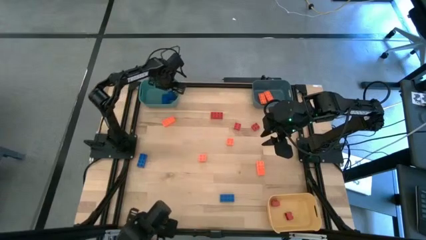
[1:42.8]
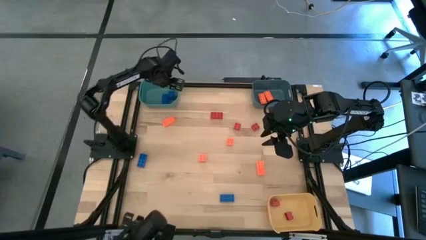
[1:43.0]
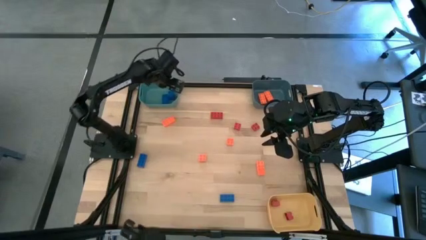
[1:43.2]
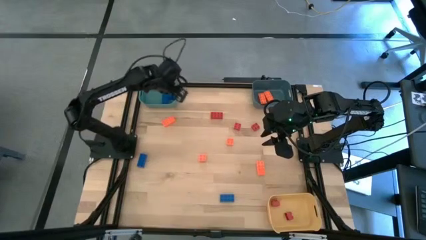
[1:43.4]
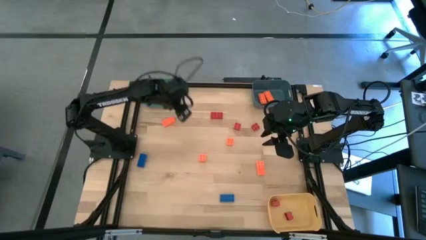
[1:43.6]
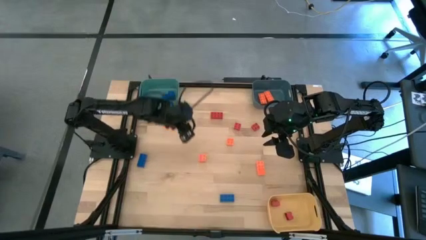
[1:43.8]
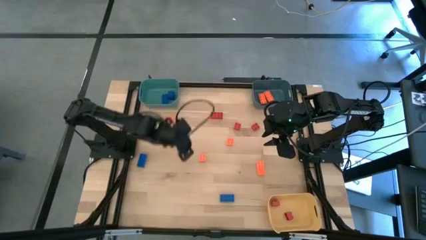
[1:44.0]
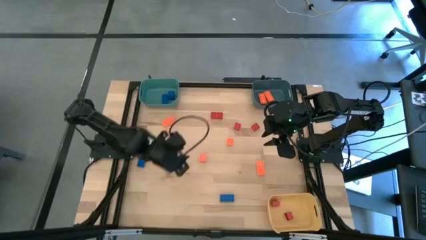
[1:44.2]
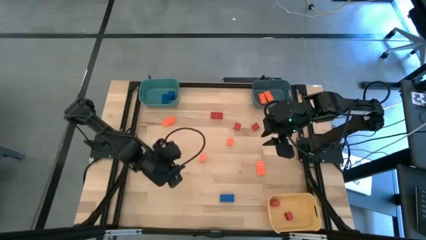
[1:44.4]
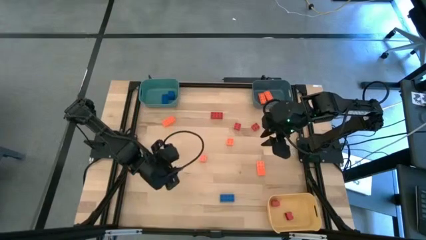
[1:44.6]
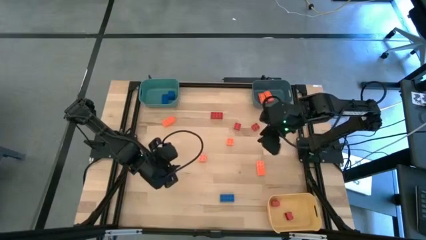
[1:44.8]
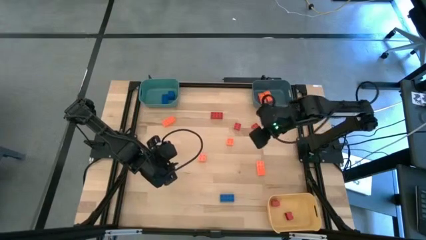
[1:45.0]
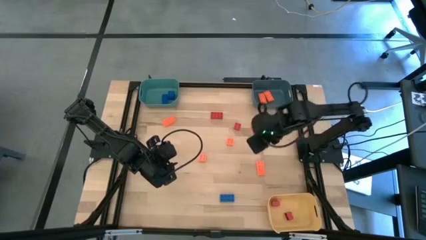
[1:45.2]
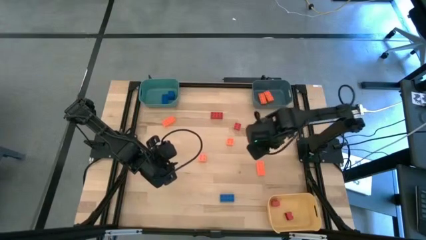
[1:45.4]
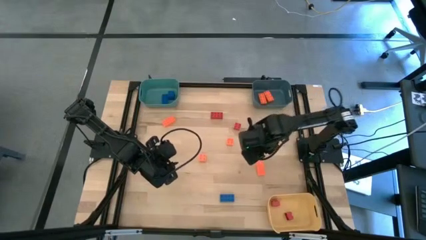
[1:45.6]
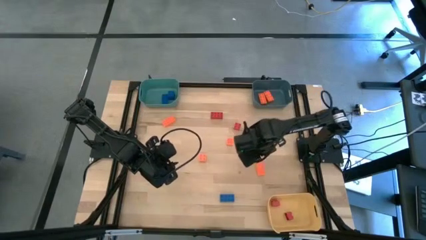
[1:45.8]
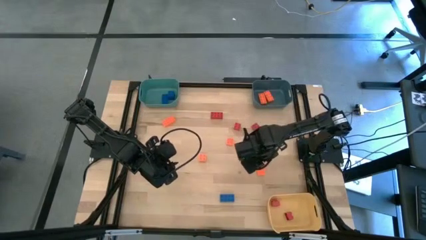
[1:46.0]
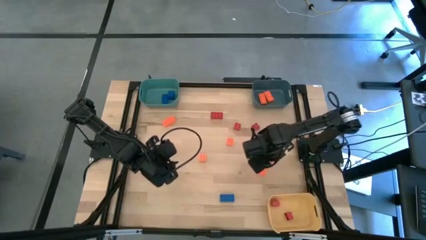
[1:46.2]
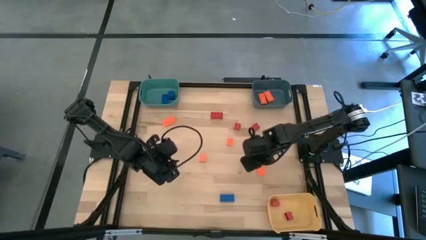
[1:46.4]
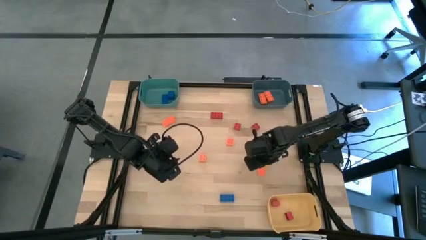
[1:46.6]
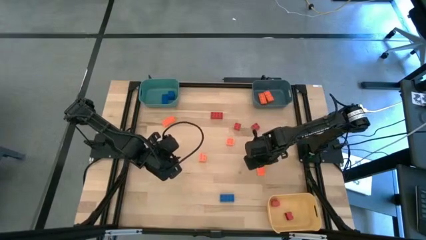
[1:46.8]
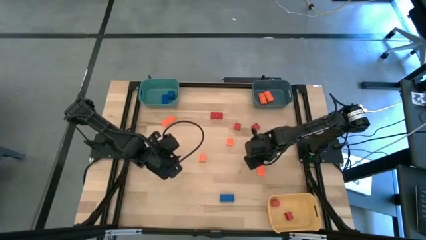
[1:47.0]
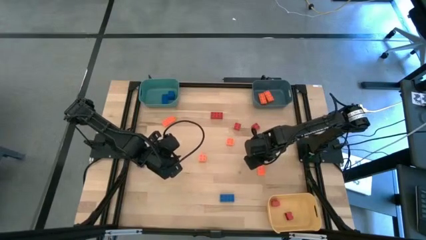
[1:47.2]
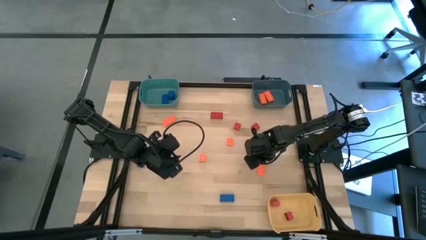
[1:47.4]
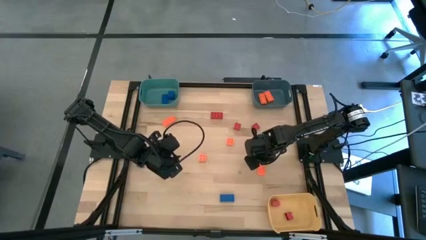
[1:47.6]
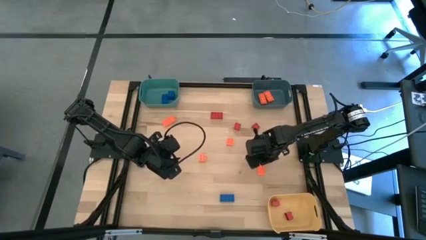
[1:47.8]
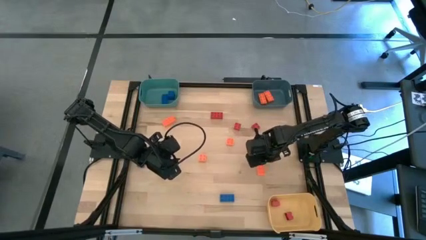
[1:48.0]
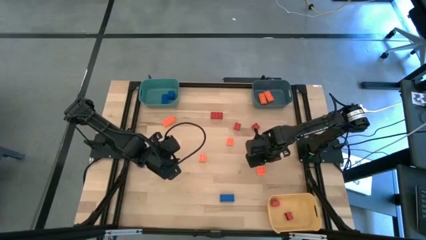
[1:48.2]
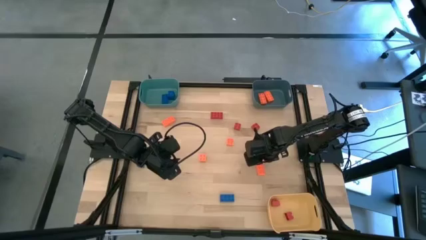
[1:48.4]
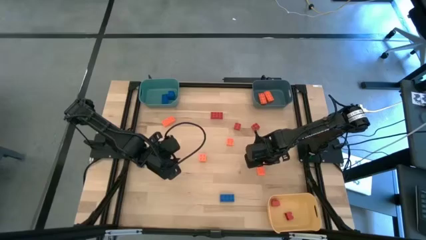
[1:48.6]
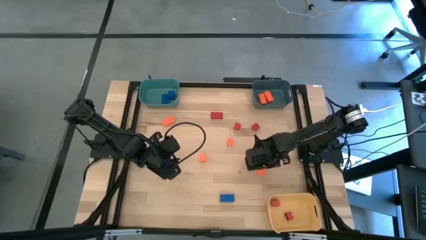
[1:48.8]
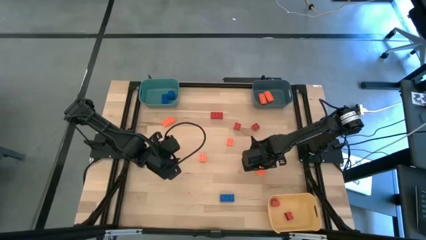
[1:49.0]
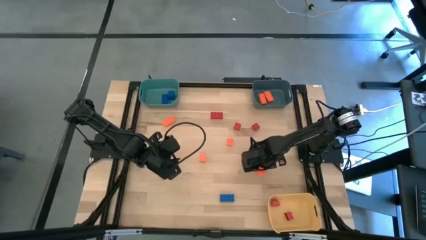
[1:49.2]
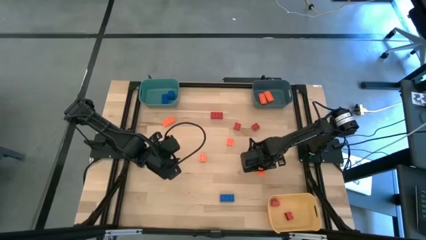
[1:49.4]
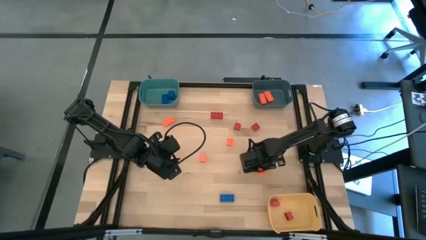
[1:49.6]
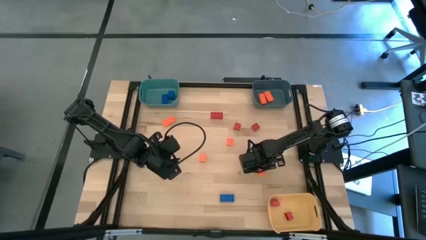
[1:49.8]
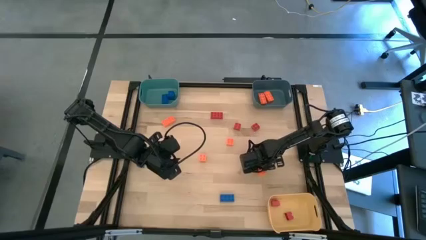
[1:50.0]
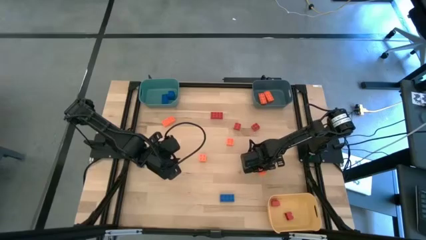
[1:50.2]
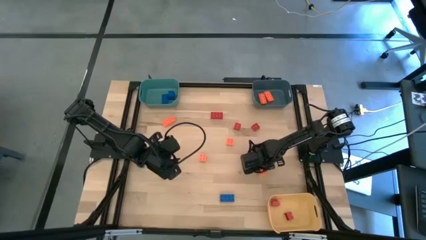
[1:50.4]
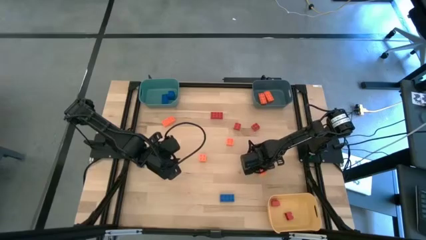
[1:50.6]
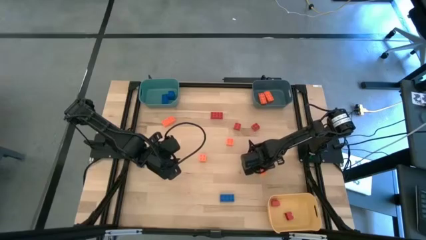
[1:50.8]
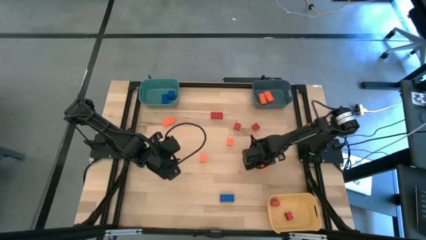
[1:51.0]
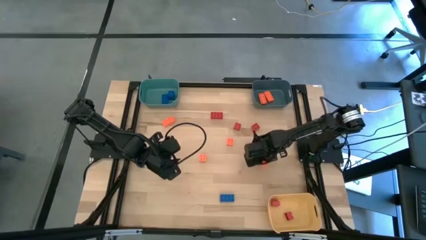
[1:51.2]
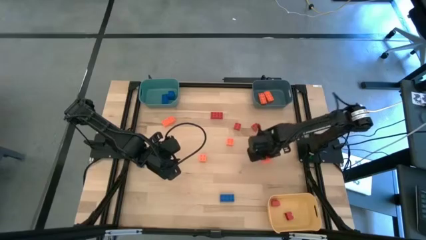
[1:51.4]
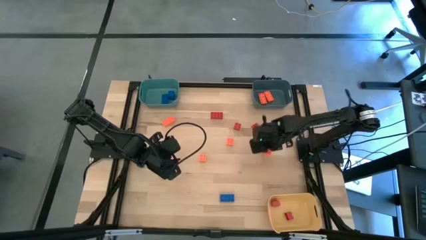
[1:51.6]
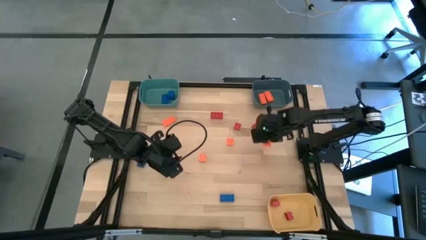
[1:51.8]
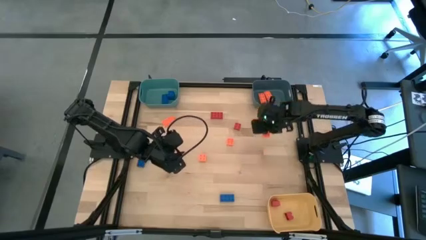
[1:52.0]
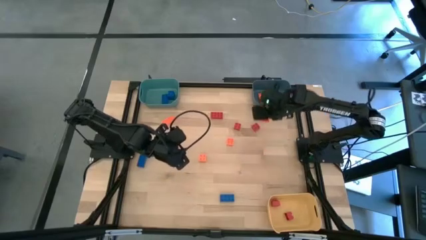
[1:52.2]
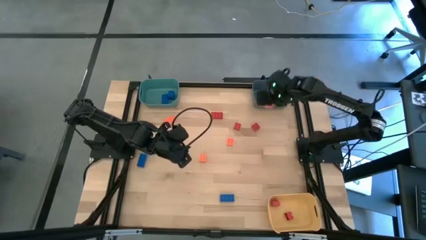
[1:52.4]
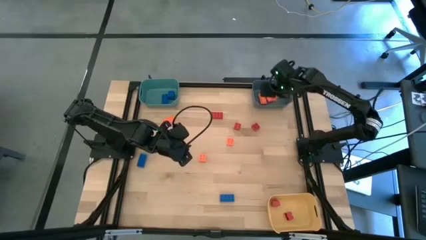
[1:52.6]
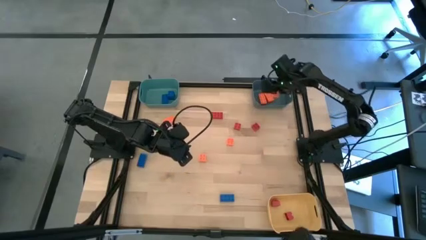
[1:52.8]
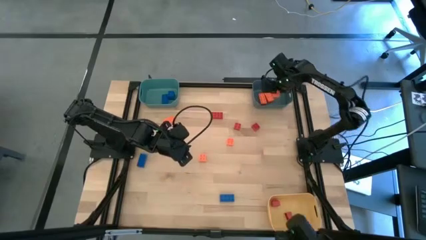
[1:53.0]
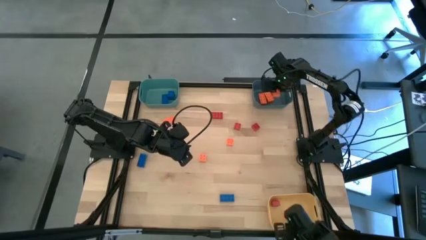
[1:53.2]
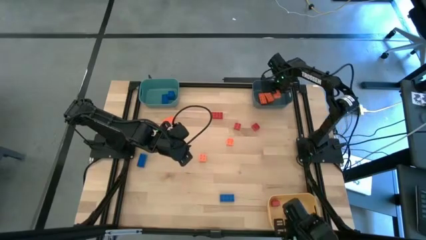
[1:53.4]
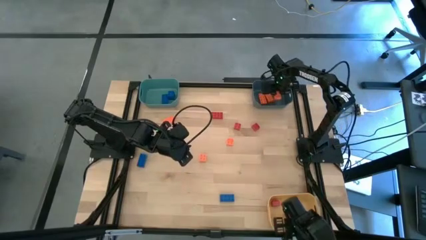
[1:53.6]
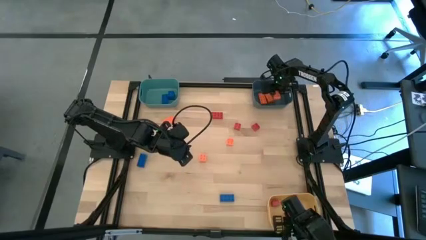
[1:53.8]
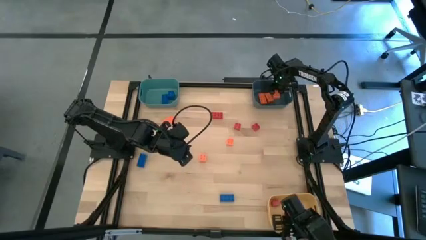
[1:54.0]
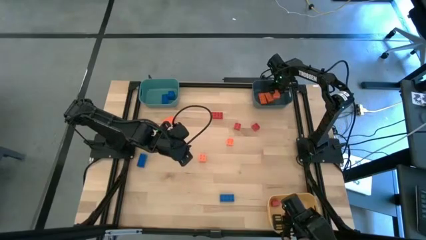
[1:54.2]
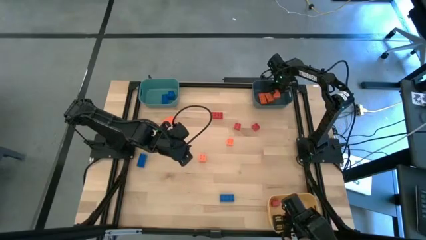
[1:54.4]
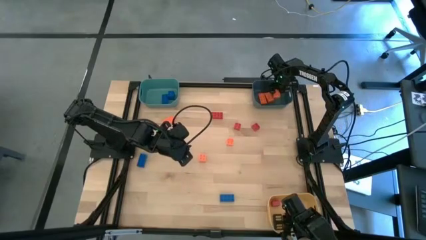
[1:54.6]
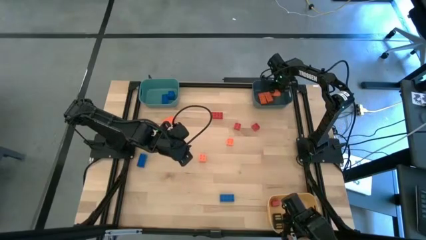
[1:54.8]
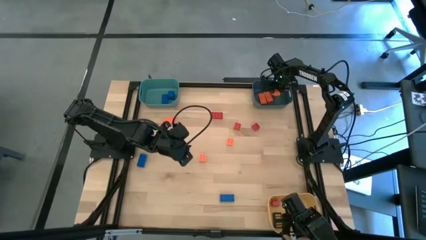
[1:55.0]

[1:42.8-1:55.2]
Task: Sort & place blocks by color
Put the orange game piece into the blue bin
